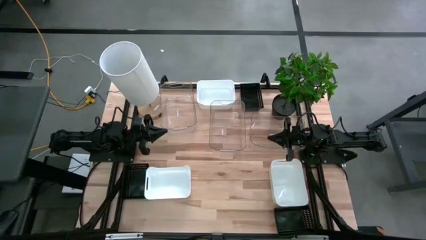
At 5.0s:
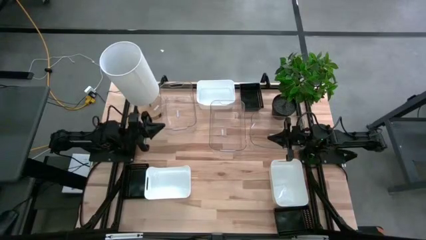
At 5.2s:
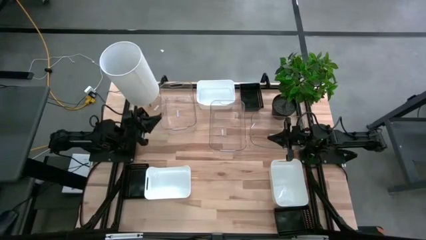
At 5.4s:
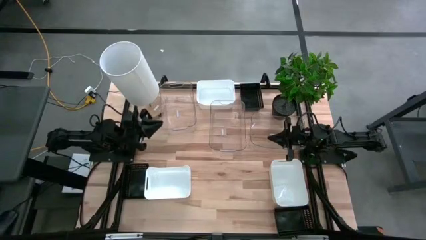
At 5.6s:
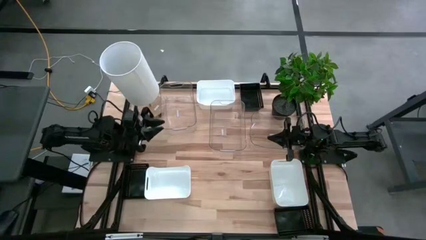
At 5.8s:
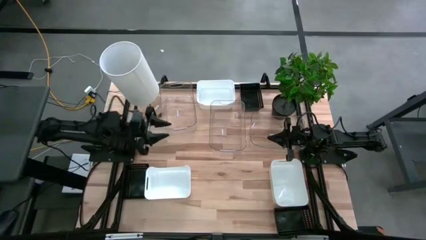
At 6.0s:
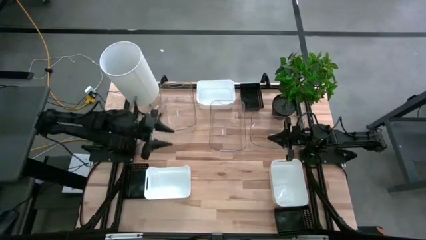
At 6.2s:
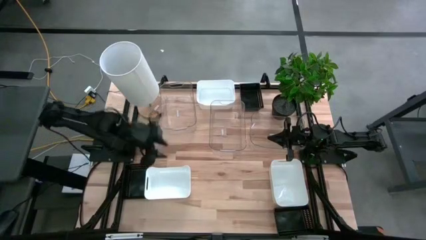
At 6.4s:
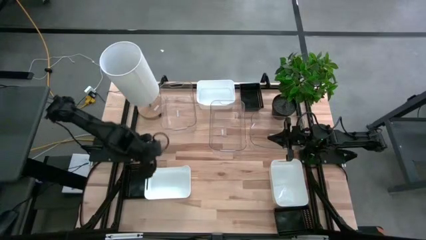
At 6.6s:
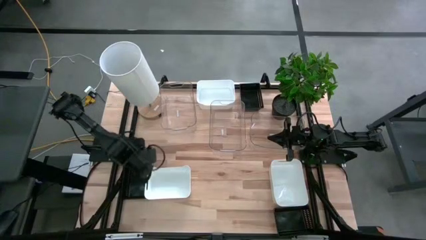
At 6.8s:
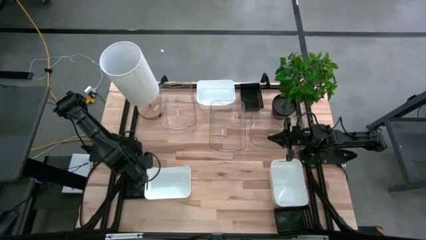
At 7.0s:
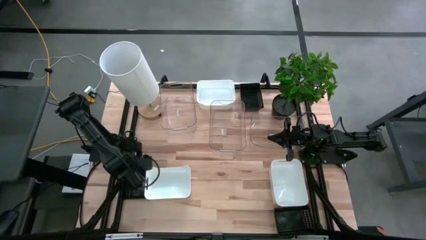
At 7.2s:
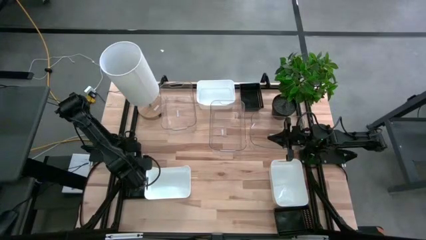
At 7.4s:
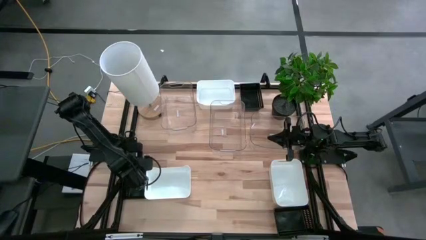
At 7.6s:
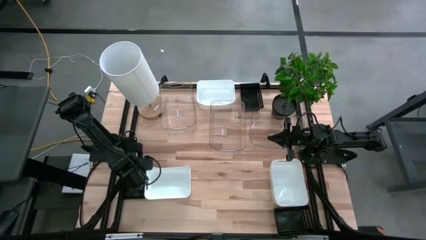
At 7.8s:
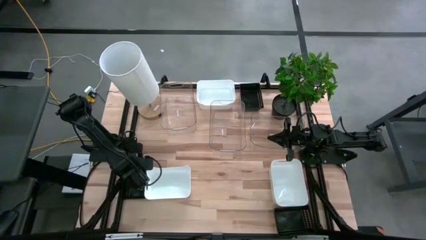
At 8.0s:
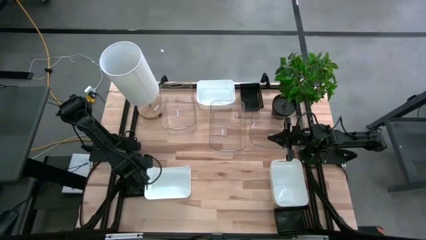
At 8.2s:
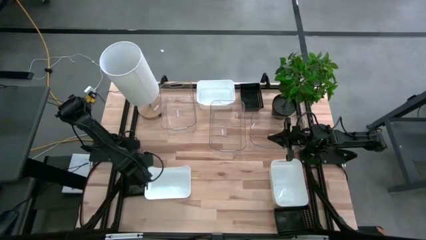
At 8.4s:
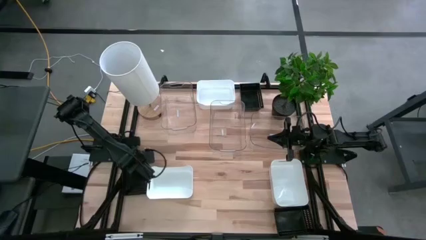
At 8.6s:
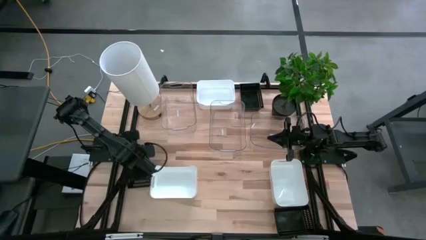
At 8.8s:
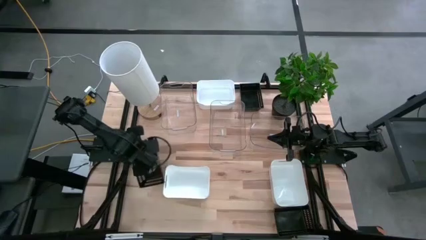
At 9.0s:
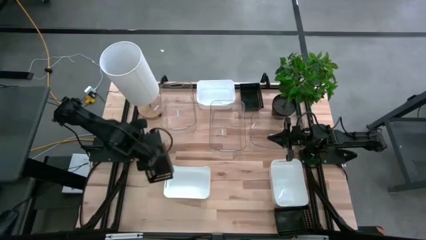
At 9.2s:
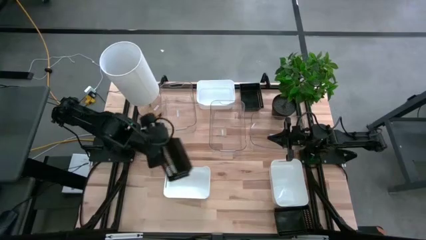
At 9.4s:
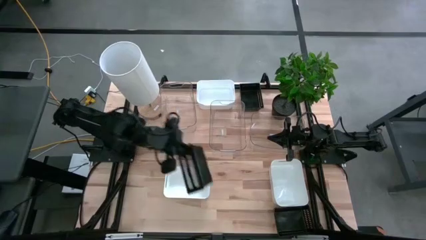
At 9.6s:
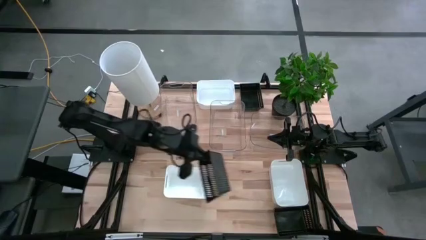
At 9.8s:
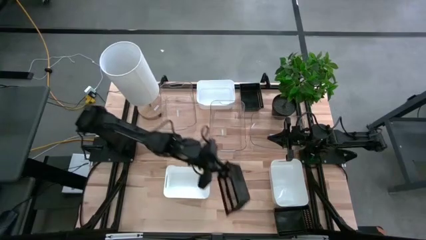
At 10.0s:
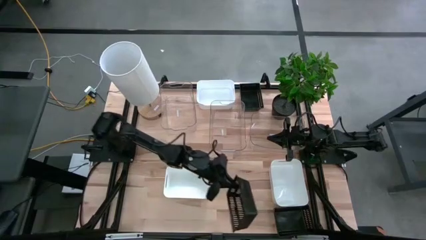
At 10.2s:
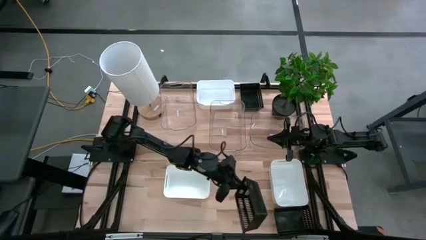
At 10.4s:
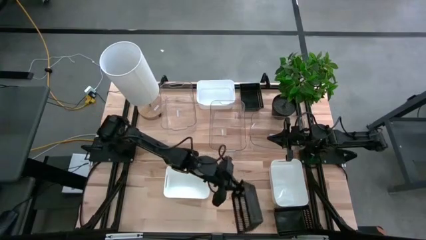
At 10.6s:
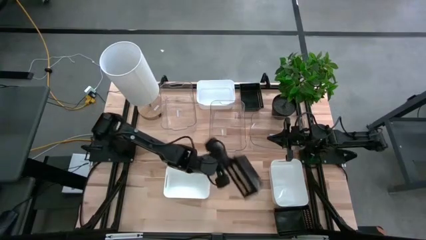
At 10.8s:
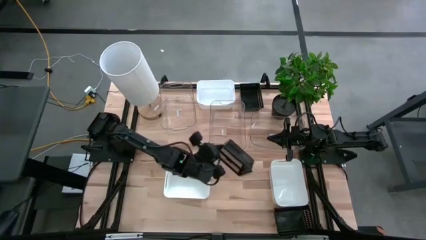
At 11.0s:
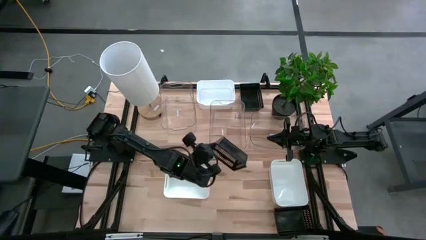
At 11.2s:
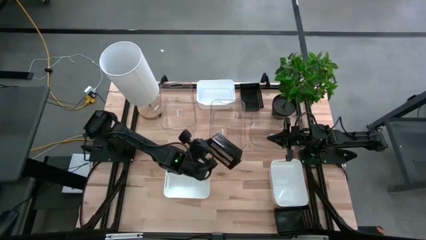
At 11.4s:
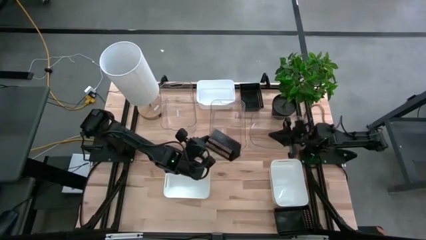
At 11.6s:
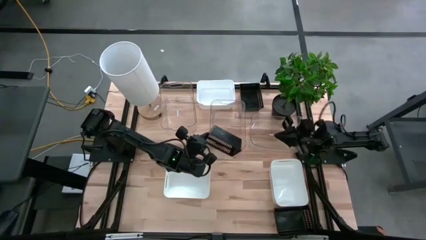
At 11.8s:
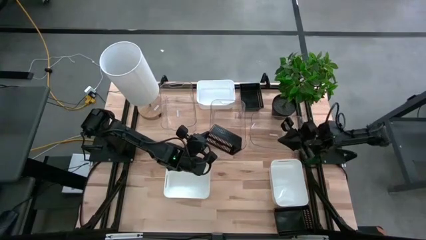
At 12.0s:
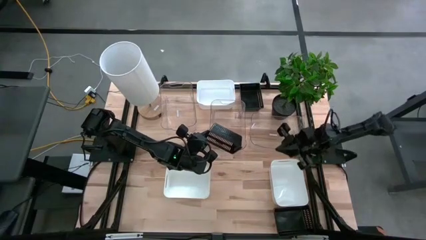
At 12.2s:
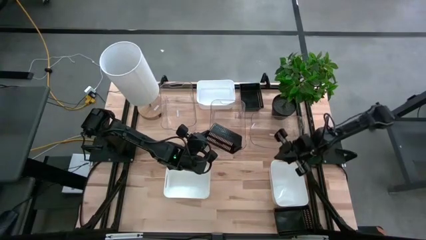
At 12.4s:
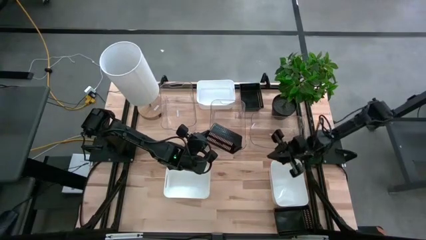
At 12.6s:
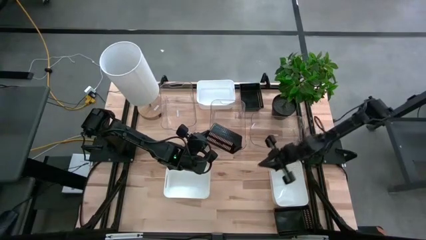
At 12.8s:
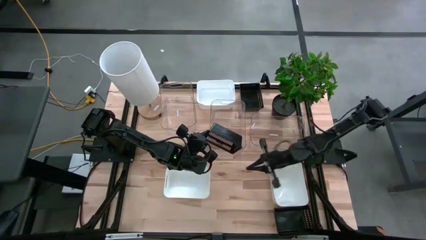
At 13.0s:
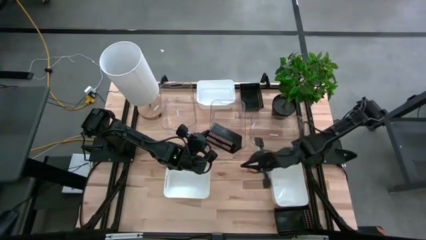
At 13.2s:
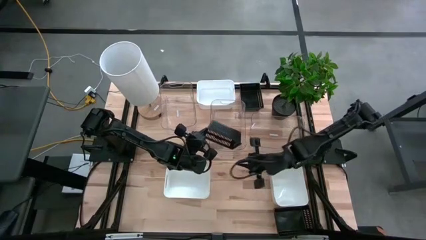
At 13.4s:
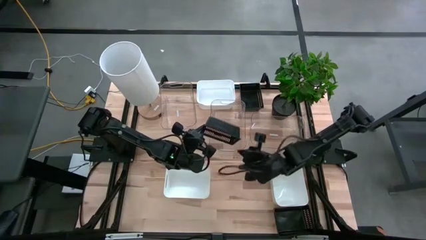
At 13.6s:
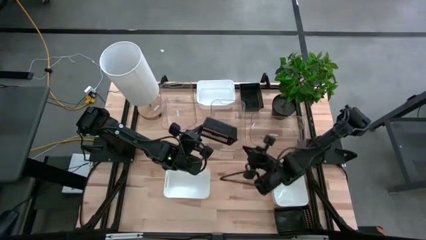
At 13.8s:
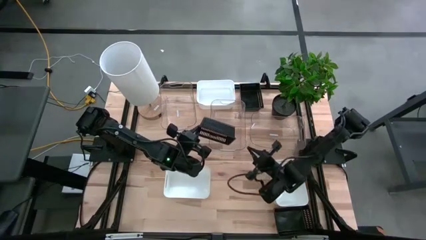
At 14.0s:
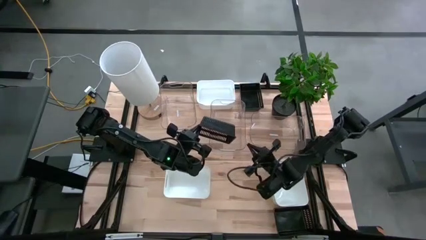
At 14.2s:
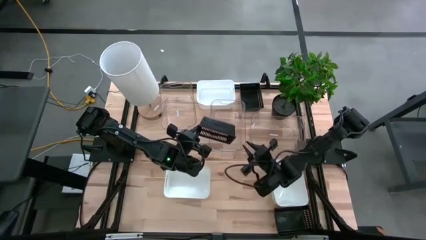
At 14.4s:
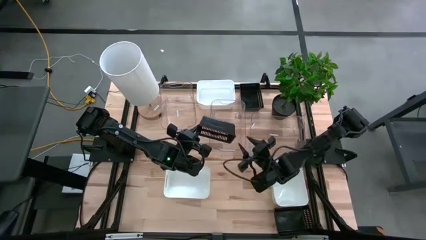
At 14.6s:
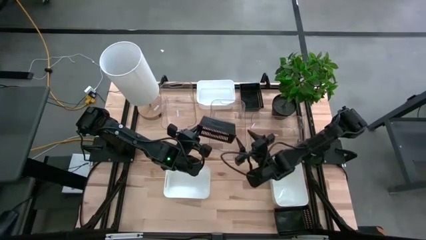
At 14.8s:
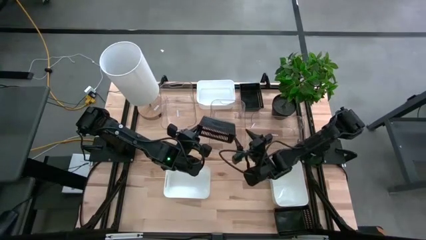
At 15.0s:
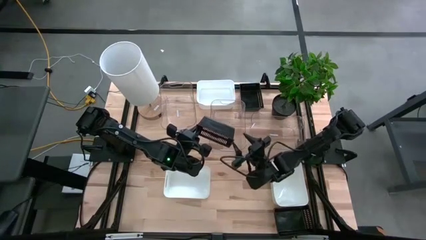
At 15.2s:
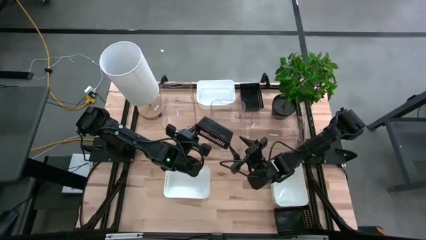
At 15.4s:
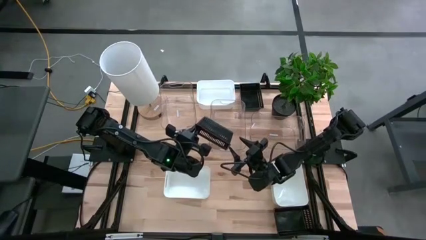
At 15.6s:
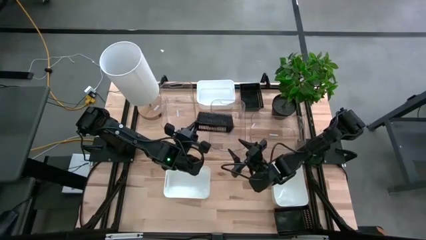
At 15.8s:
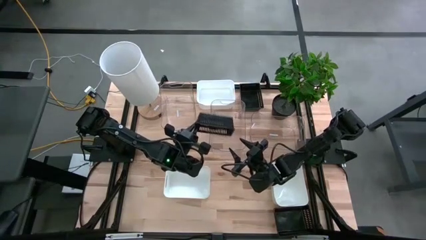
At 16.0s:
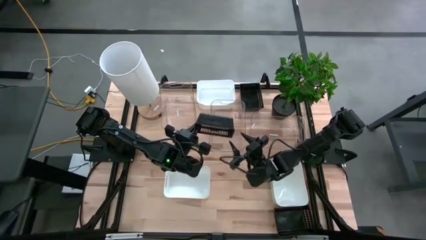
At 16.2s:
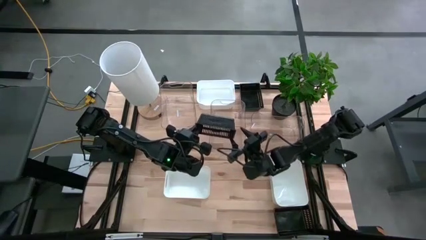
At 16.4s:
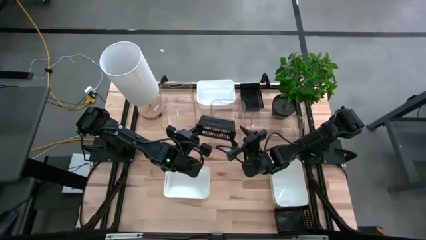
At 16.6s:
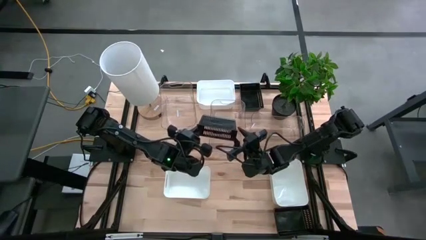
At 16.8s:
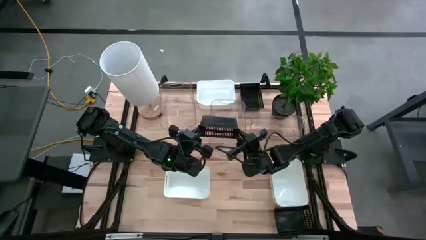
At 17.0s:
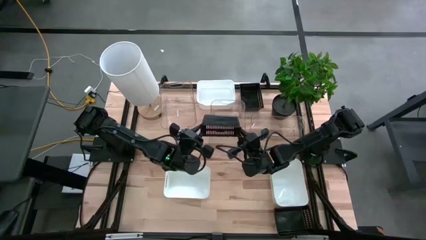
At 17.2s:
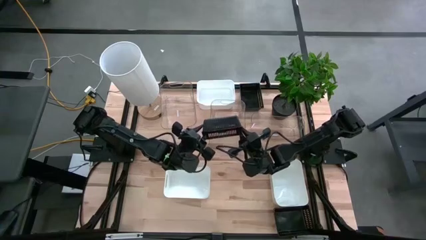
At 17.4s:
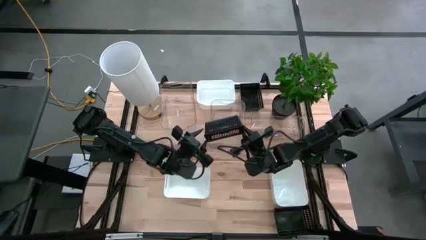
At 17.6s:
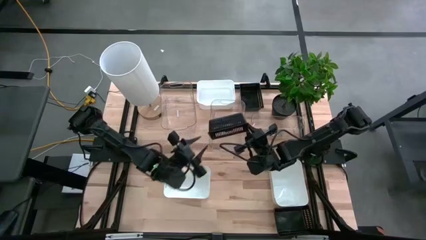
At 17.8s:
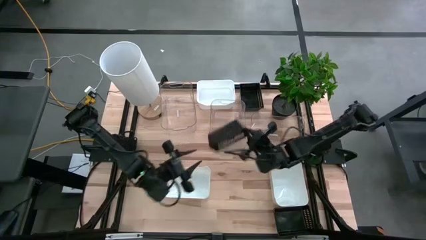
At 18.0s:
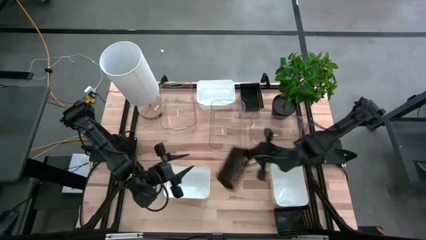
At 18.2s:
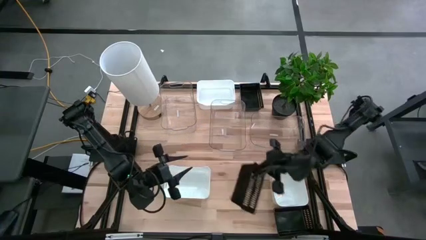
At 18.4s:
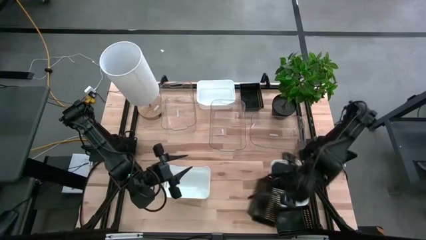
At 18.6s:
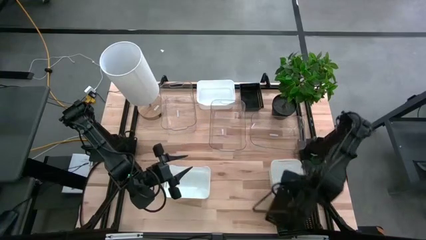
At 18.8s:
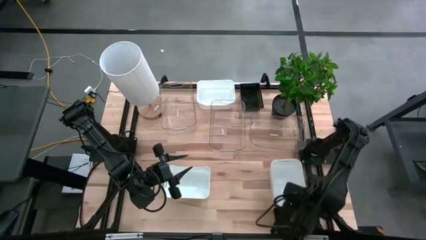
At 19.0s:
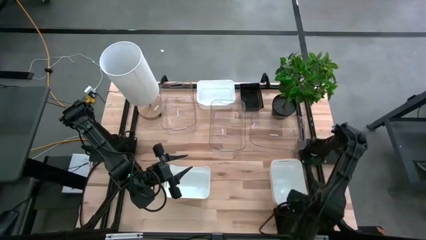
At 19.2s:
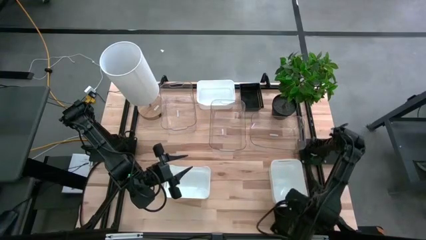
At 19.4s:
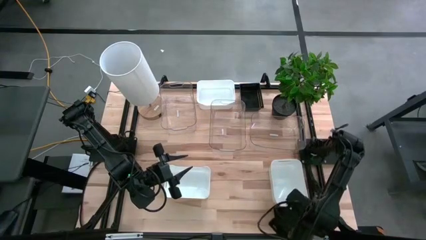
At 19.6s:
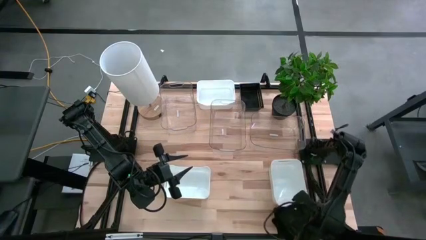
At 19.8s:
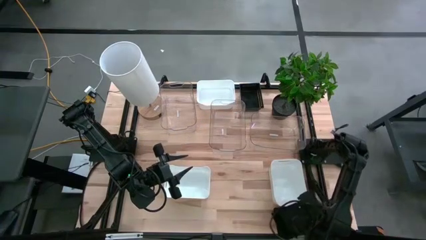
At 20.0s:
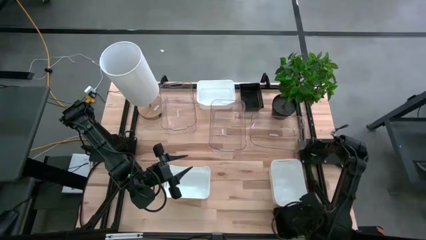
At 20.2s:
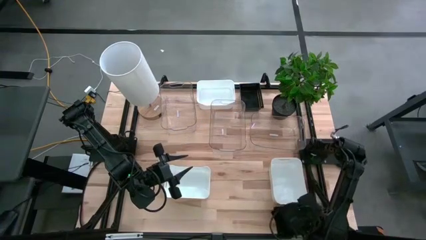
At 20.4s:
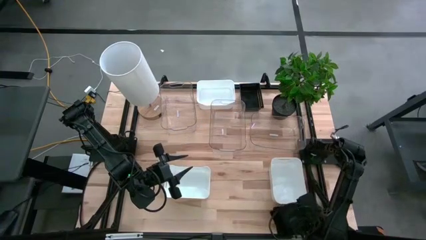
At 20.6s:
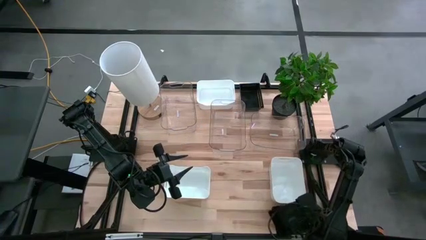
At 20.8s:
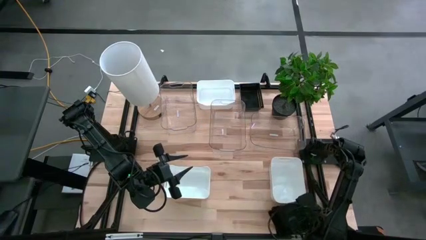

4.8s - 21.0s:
Stack the bottom left black bin on top of the bottom right black bin
